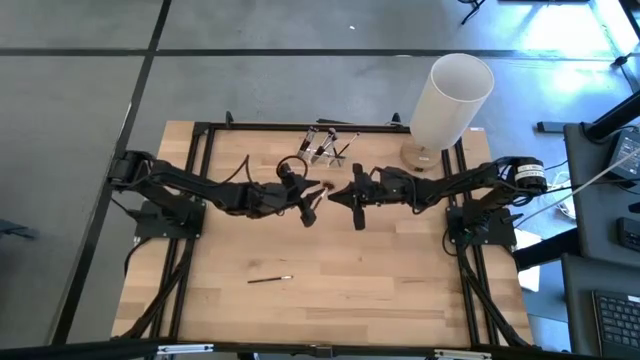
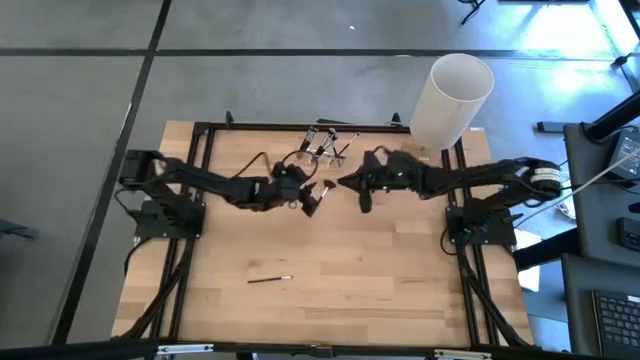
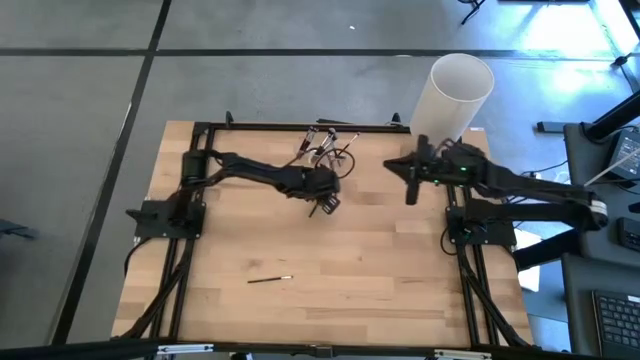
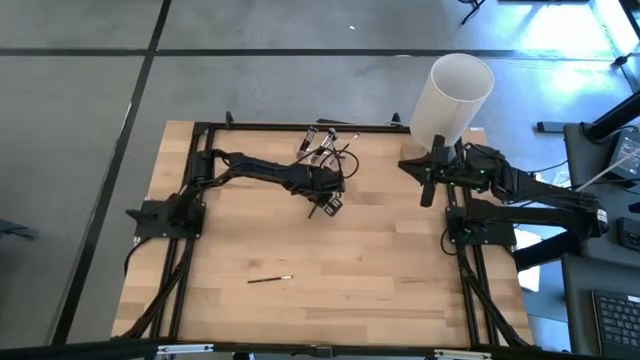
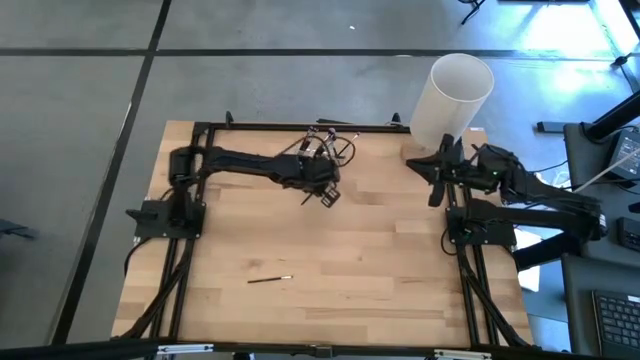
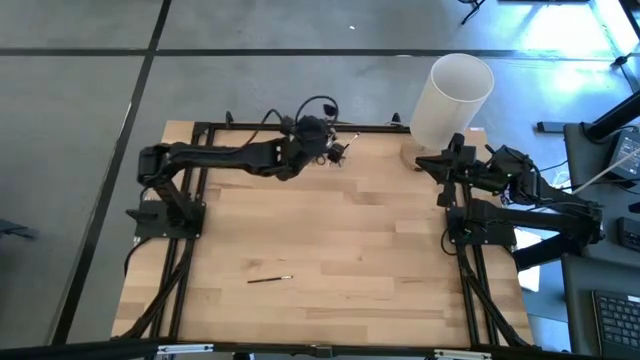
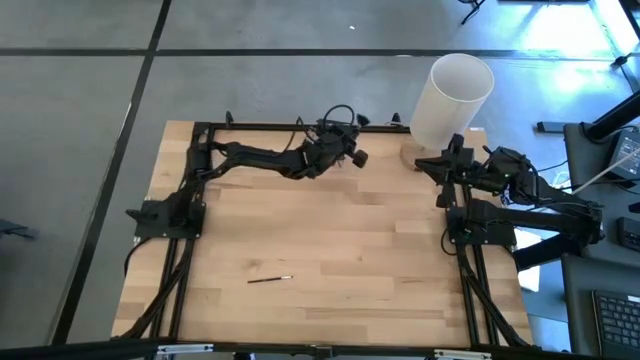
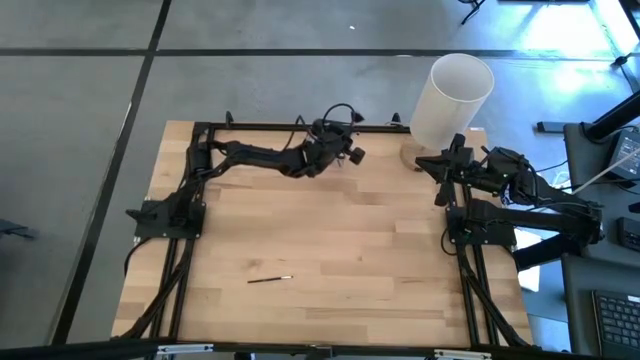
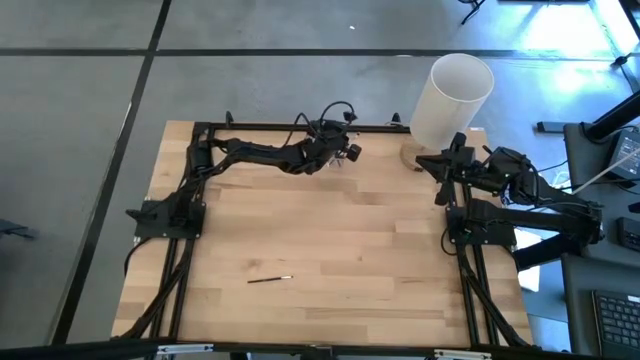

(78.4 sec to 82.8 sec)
Task: Pick & Place Makeup Brushes
Put the highlighter brush into the transparent organizer

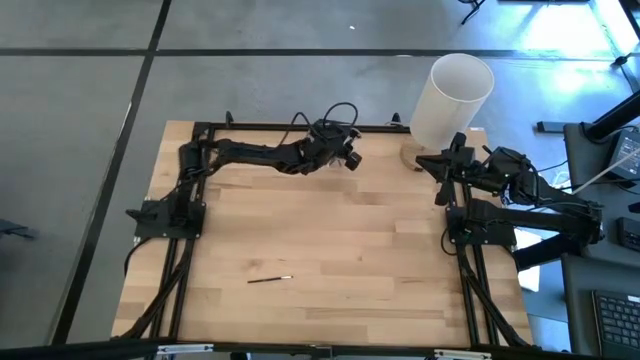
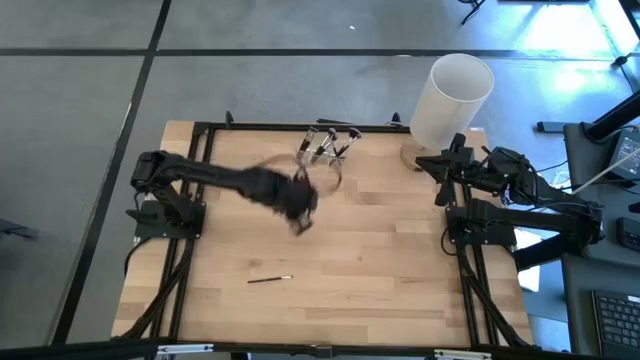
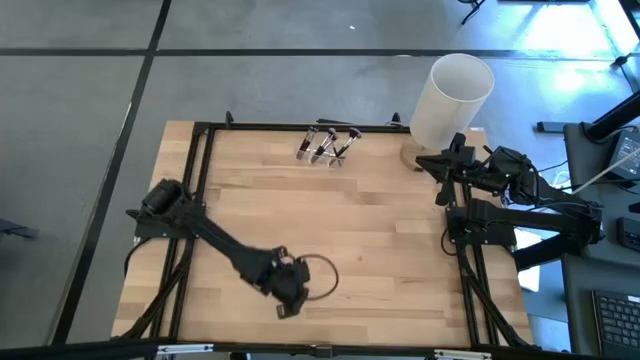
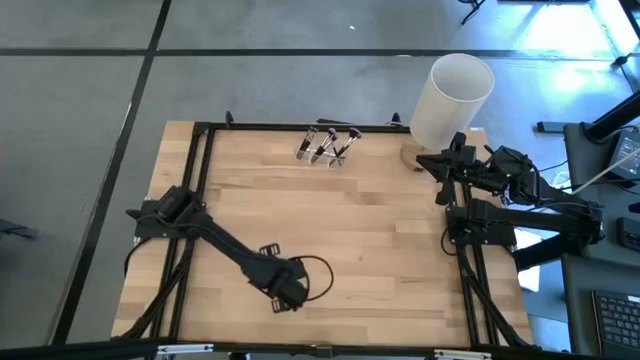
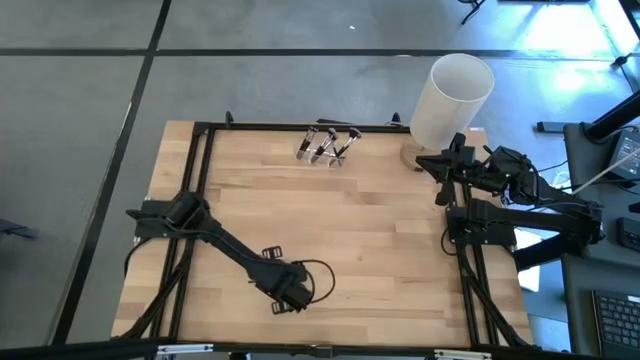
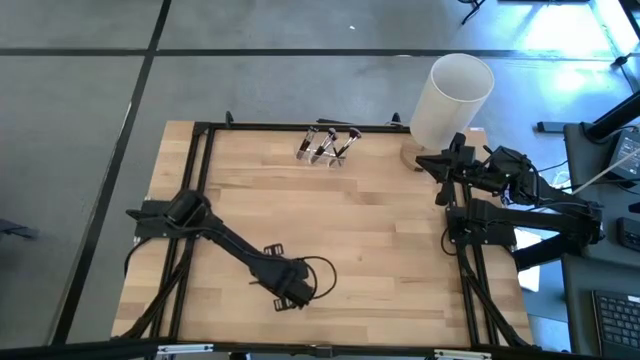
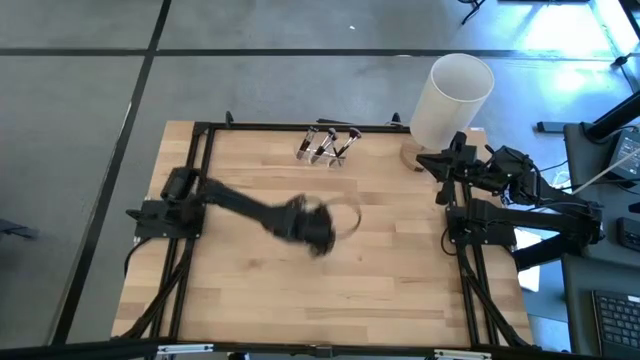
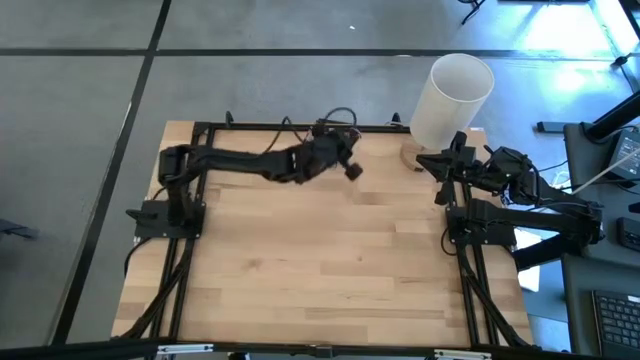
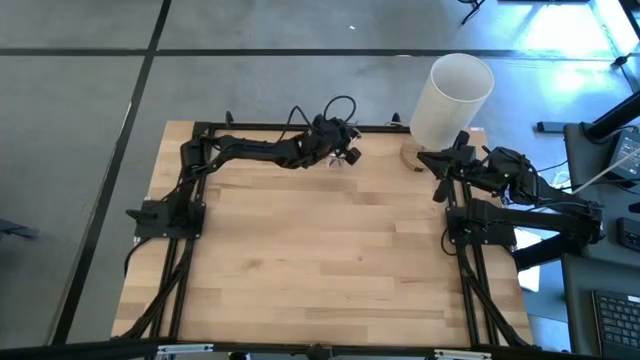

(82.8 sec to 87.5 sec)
Put the eyeshadow brush into the transparent organizer

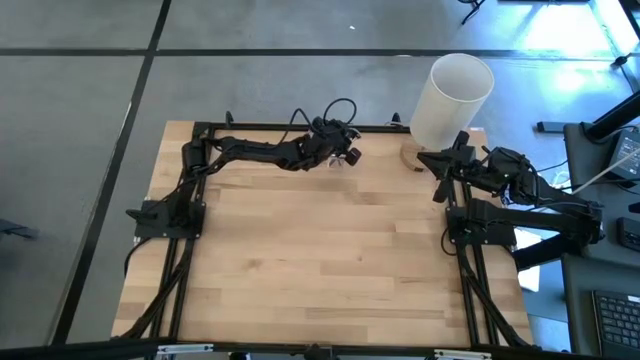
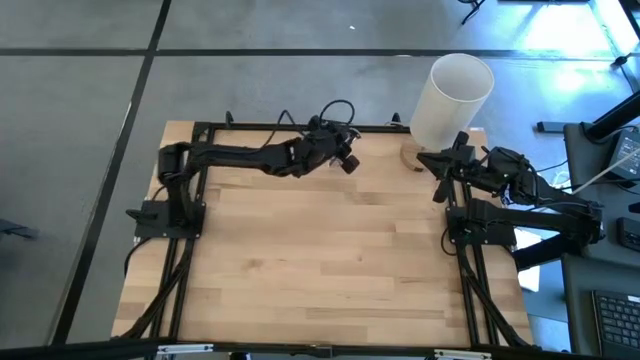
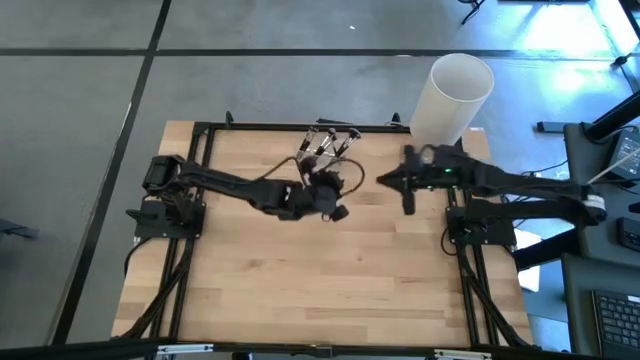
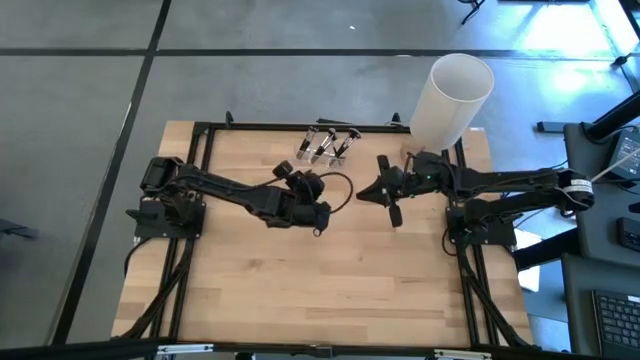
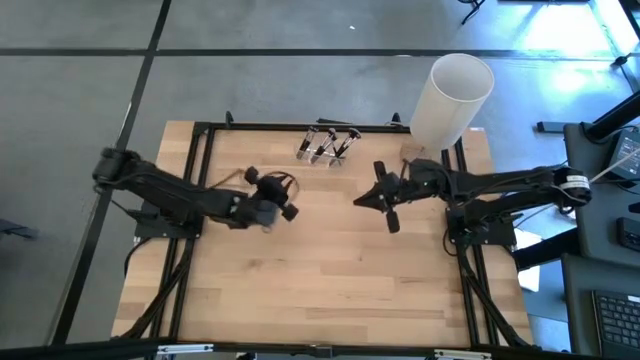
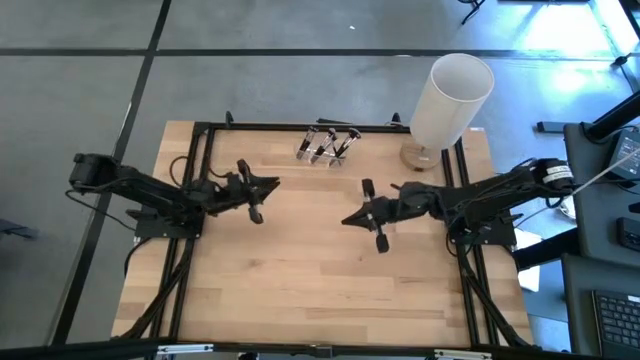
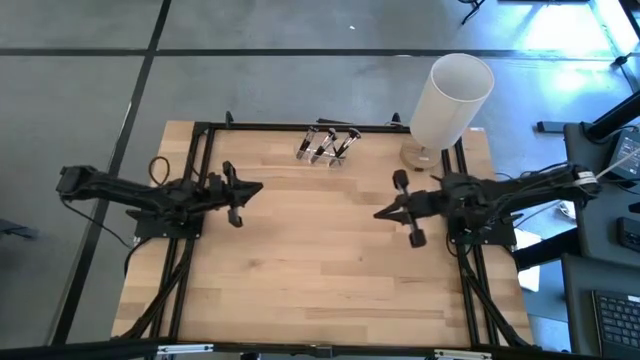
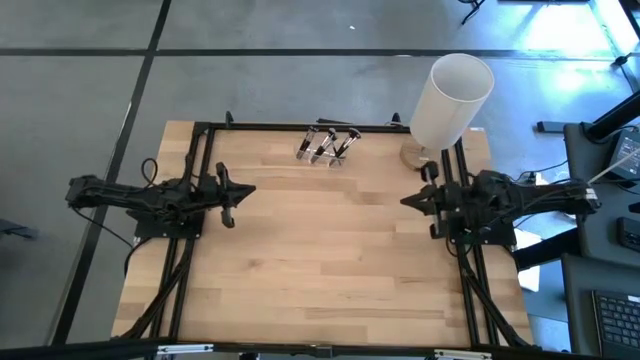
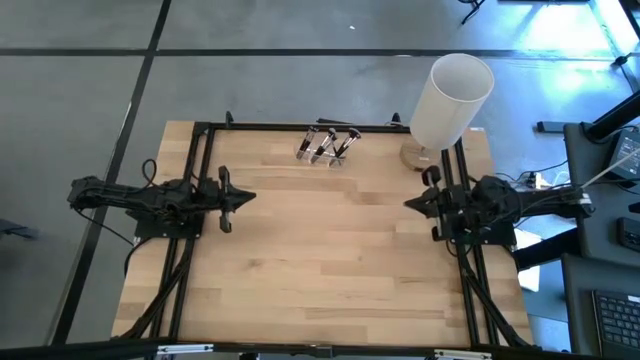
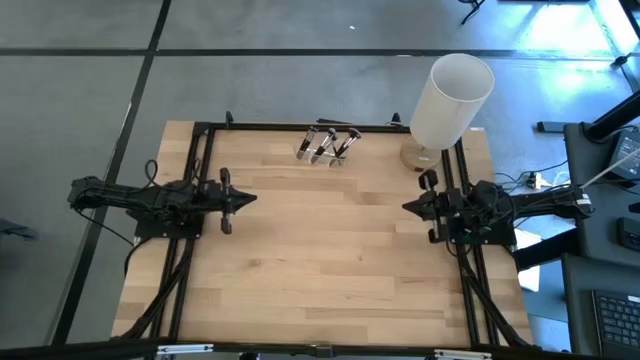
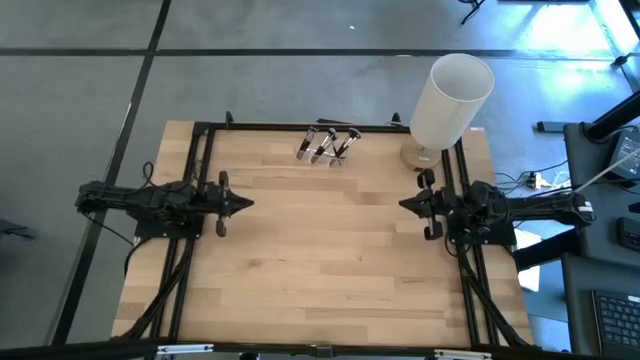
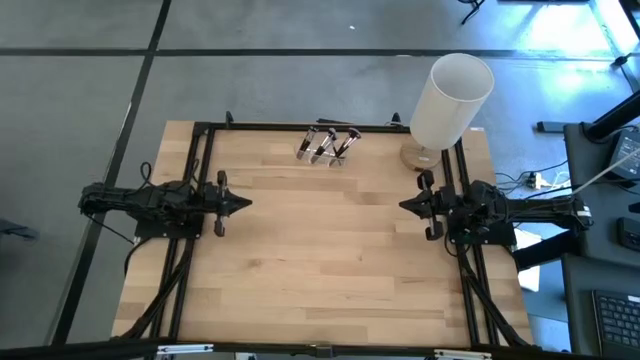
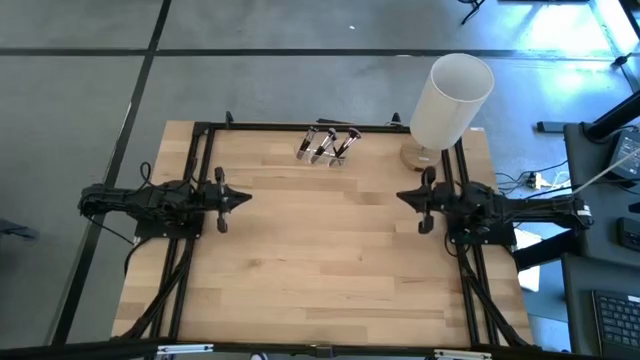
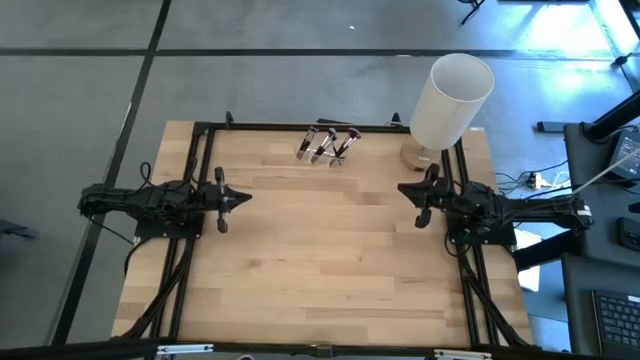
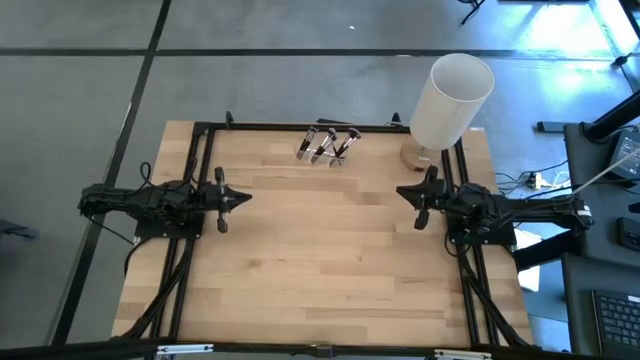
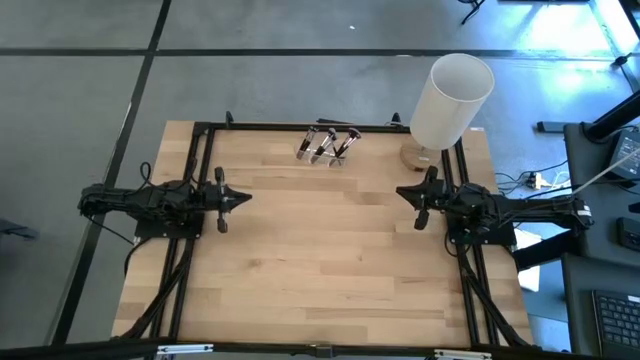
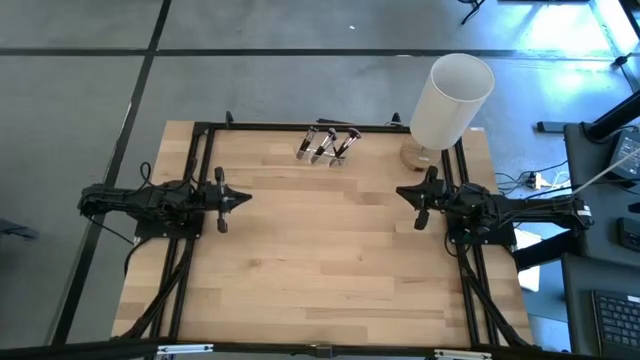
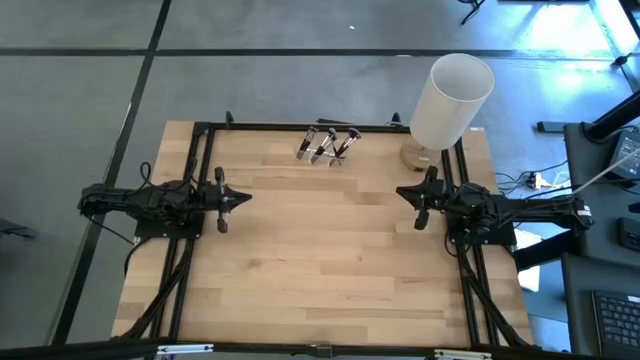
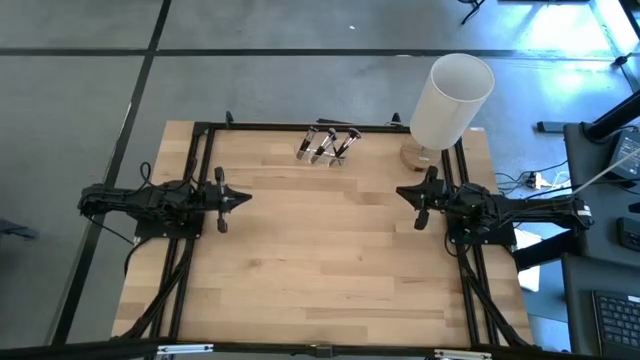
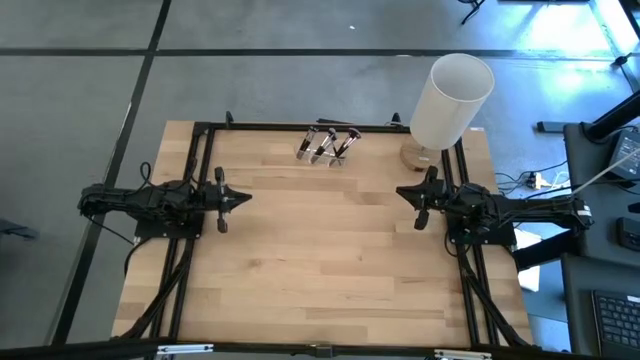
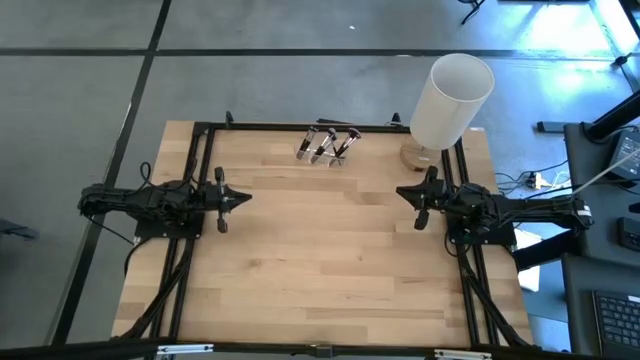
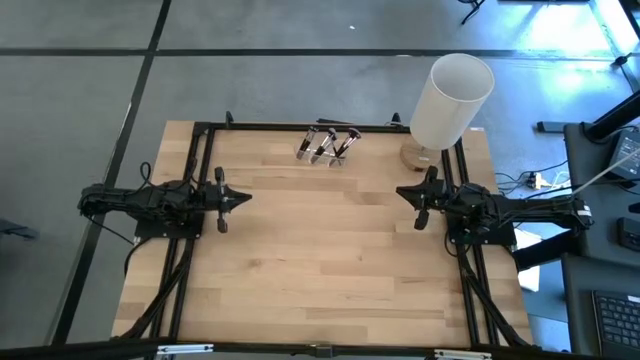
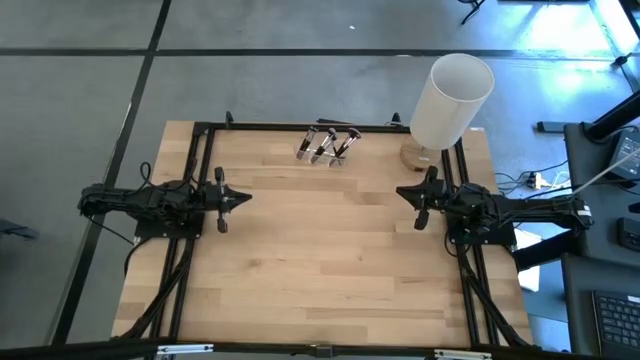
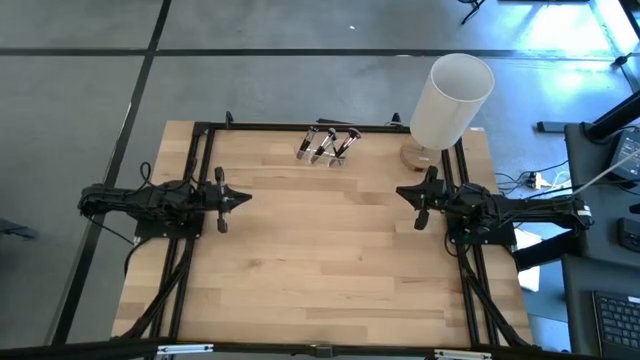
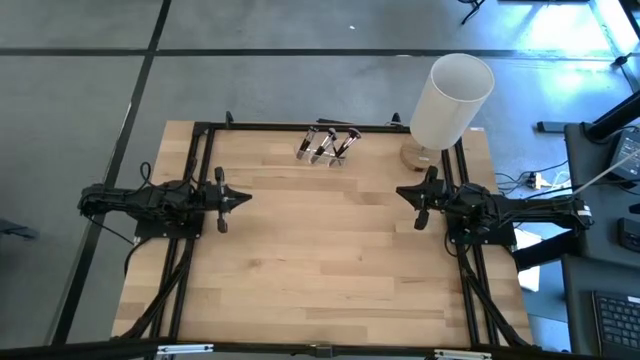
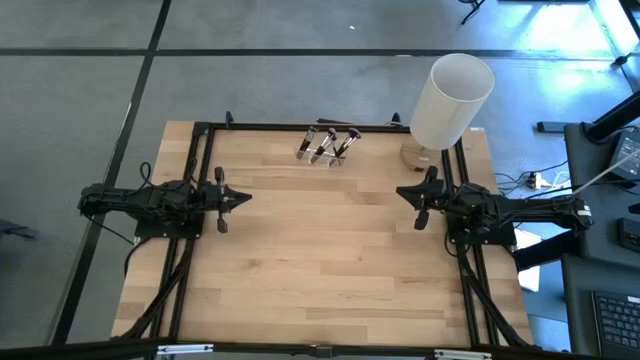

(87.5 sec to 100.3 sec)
Return to Home Position
